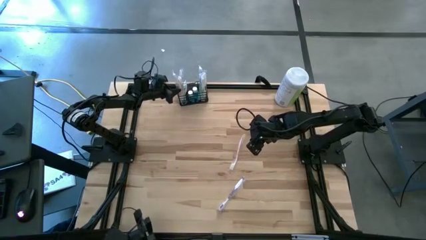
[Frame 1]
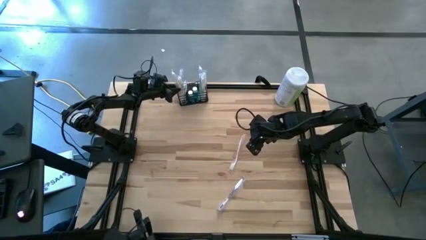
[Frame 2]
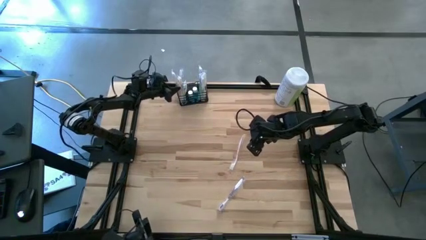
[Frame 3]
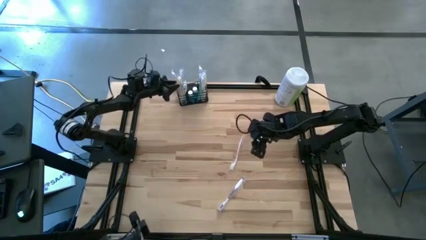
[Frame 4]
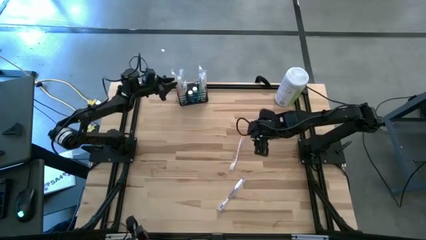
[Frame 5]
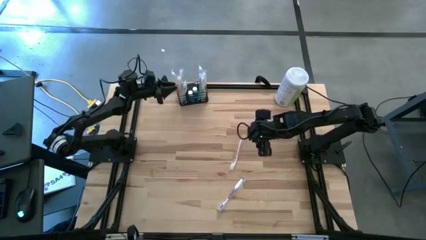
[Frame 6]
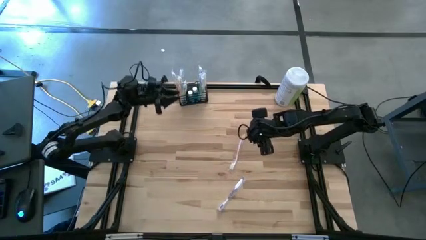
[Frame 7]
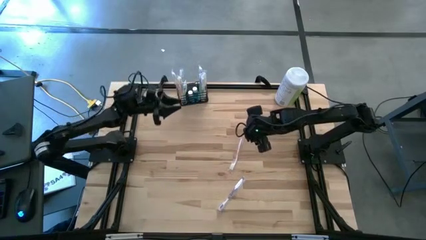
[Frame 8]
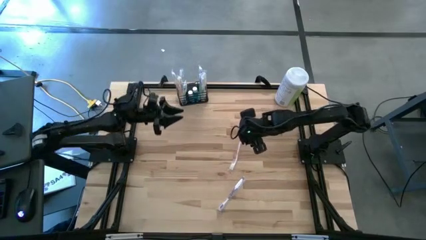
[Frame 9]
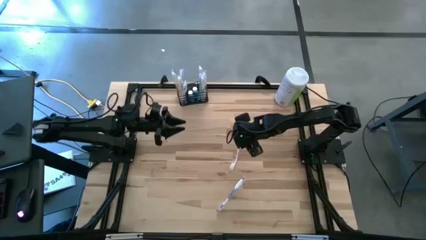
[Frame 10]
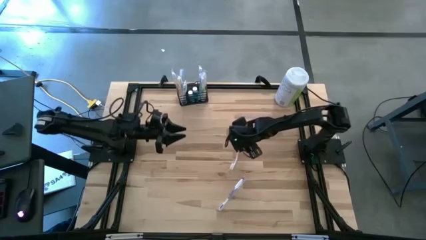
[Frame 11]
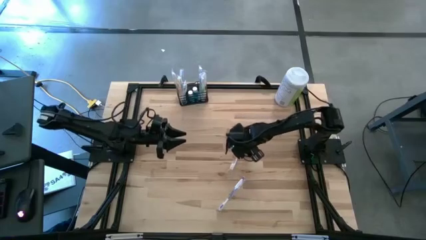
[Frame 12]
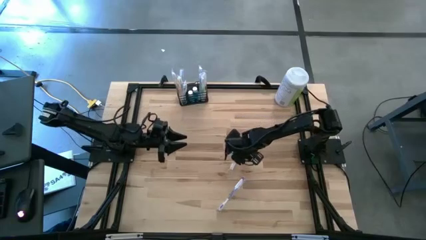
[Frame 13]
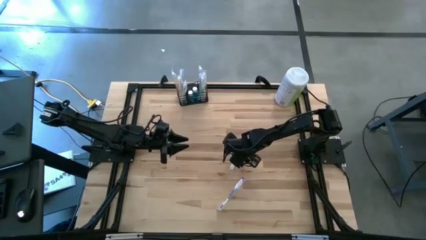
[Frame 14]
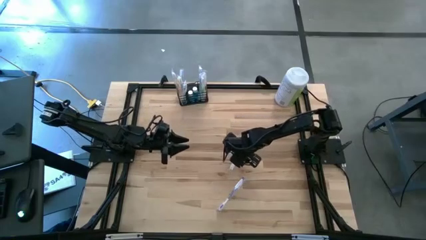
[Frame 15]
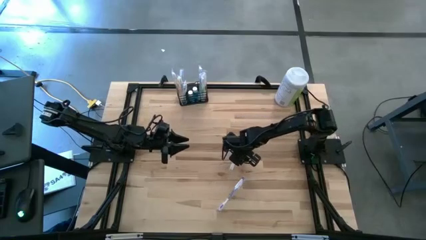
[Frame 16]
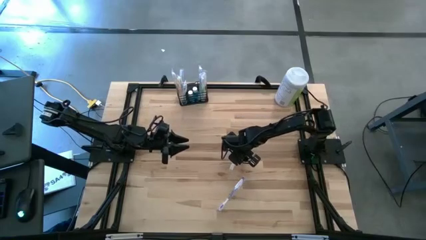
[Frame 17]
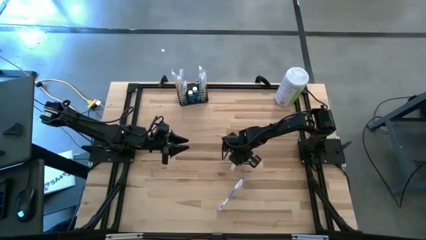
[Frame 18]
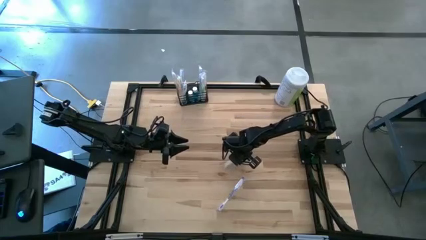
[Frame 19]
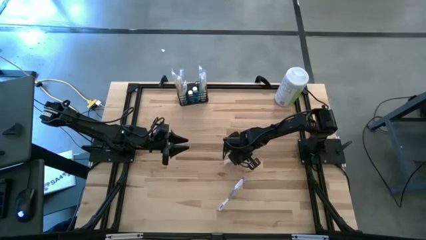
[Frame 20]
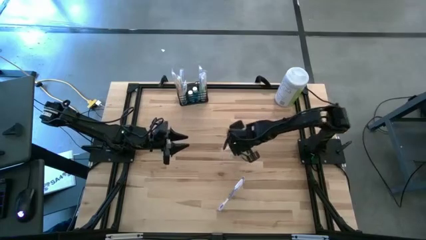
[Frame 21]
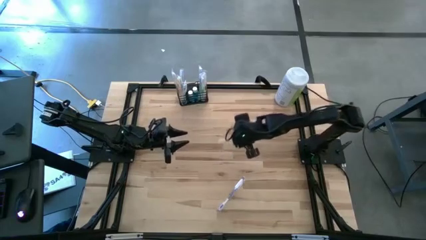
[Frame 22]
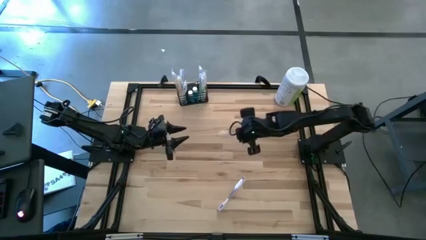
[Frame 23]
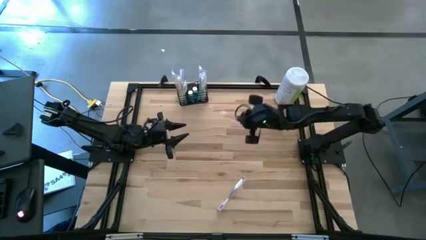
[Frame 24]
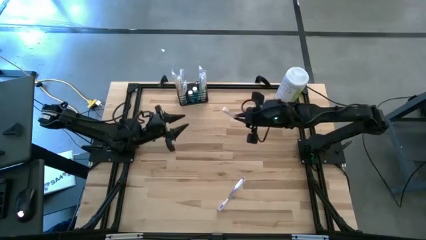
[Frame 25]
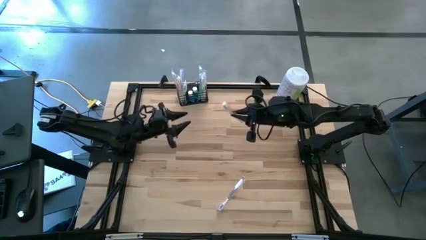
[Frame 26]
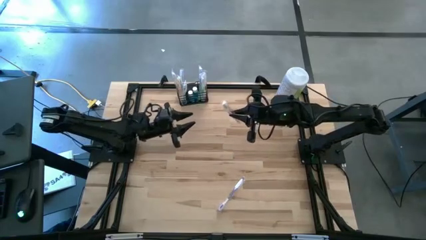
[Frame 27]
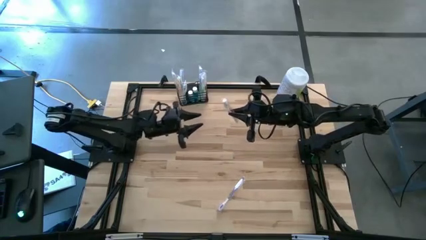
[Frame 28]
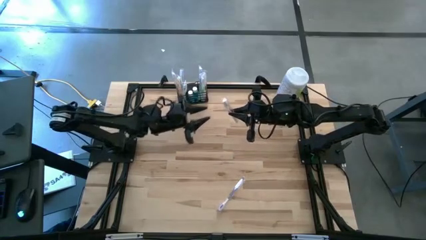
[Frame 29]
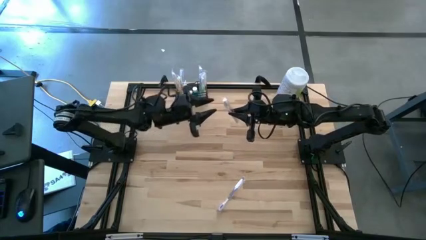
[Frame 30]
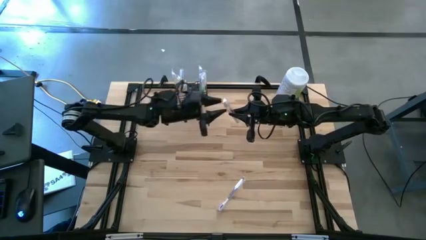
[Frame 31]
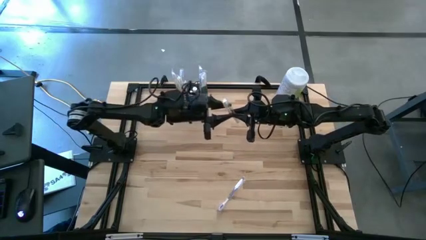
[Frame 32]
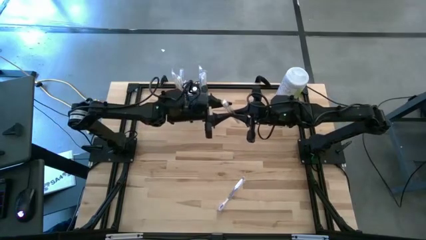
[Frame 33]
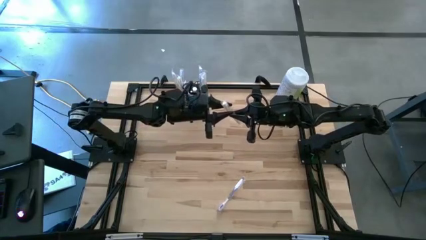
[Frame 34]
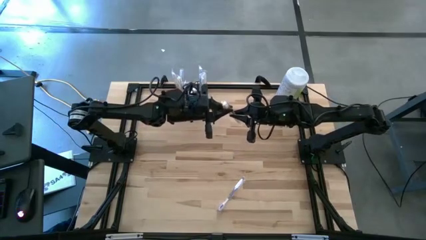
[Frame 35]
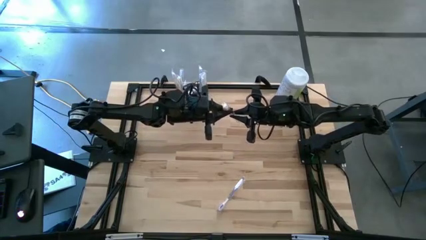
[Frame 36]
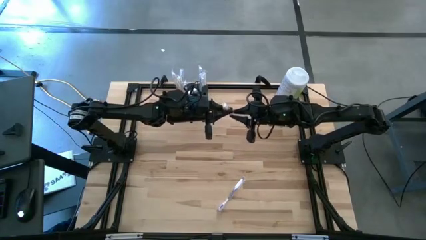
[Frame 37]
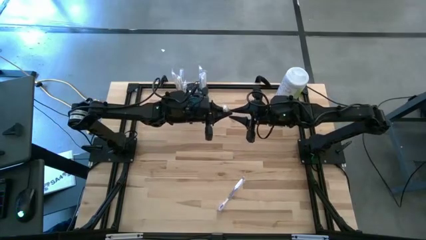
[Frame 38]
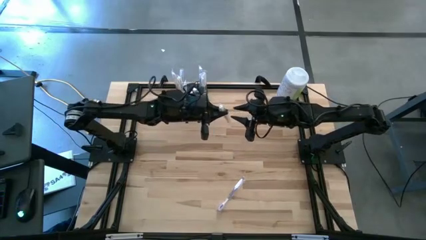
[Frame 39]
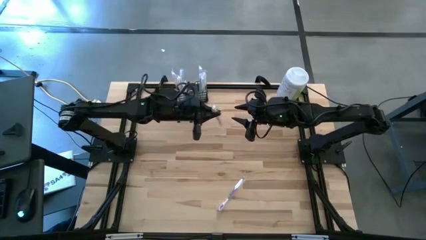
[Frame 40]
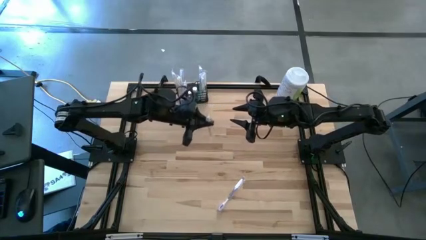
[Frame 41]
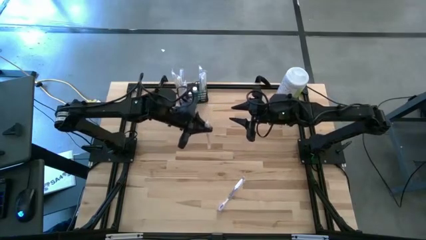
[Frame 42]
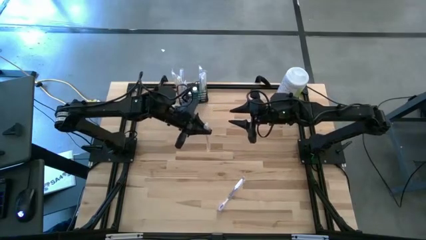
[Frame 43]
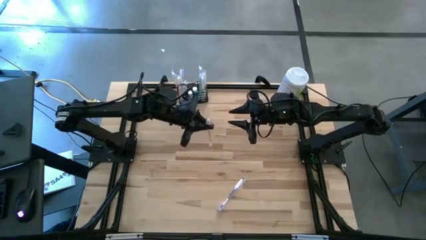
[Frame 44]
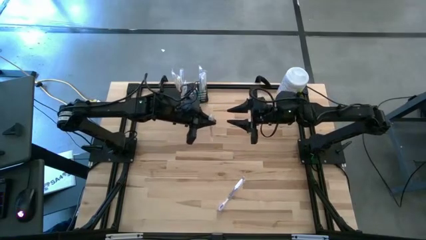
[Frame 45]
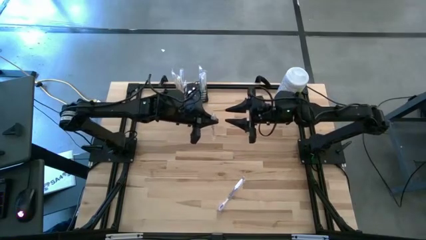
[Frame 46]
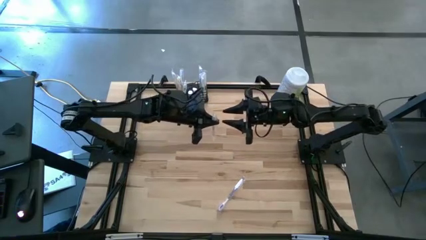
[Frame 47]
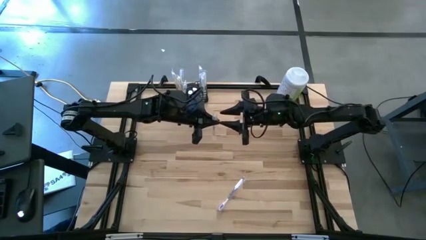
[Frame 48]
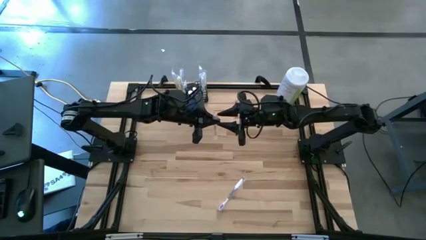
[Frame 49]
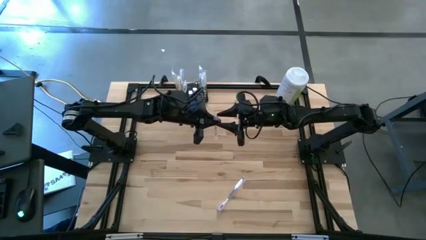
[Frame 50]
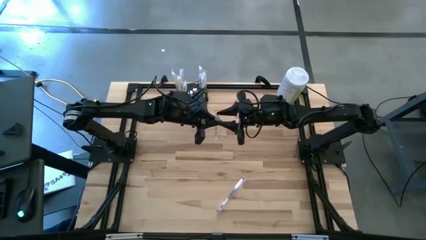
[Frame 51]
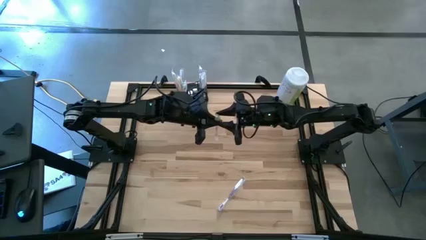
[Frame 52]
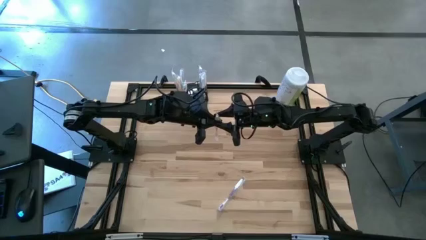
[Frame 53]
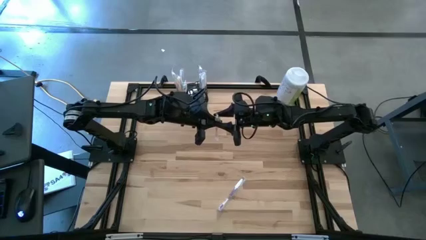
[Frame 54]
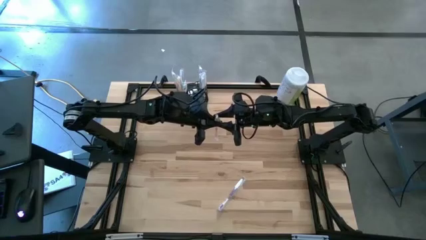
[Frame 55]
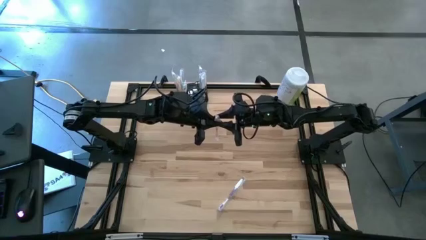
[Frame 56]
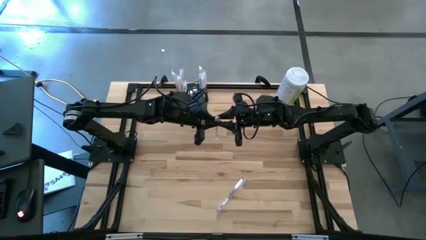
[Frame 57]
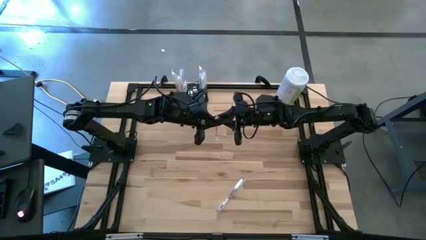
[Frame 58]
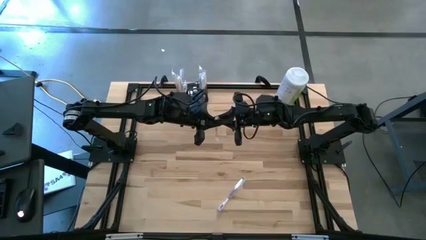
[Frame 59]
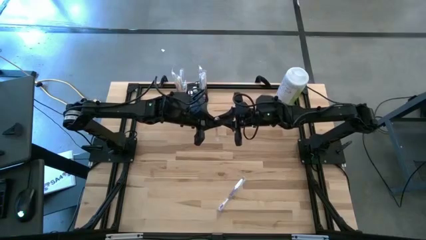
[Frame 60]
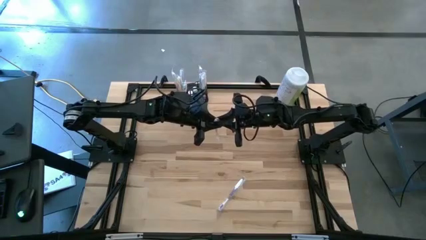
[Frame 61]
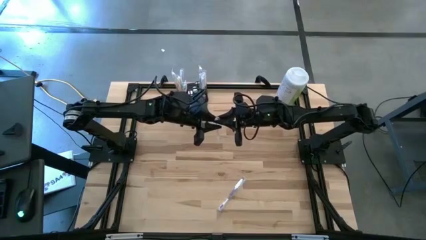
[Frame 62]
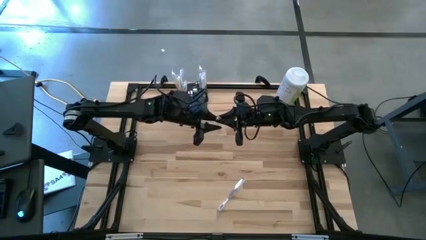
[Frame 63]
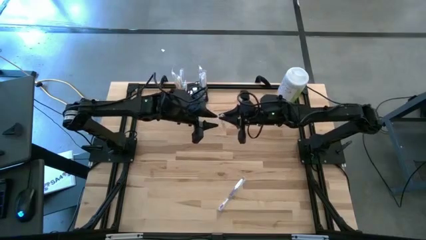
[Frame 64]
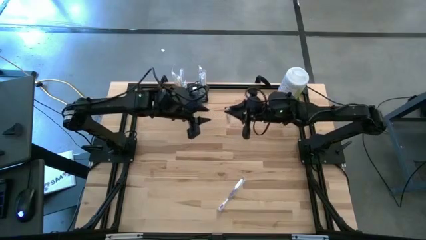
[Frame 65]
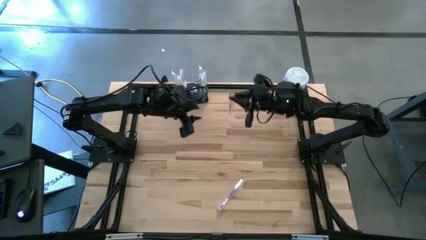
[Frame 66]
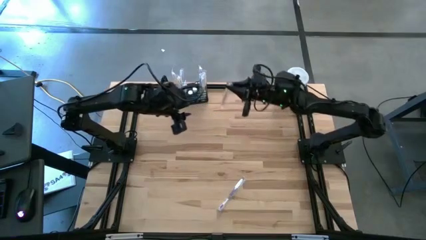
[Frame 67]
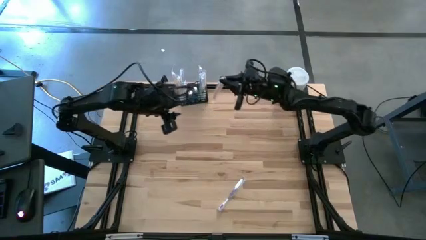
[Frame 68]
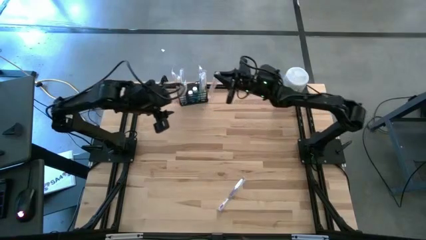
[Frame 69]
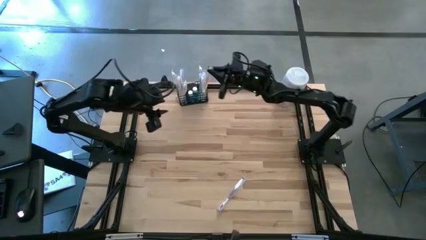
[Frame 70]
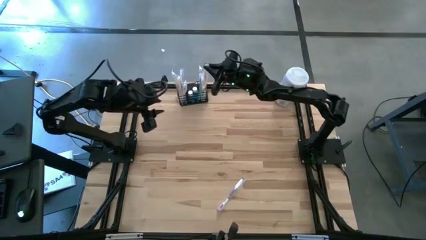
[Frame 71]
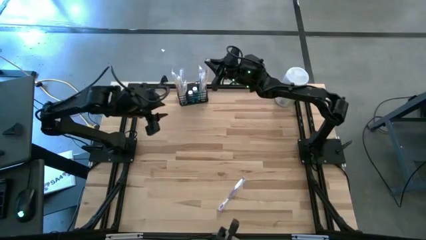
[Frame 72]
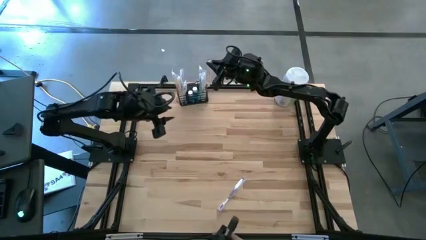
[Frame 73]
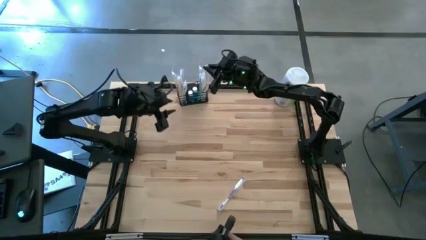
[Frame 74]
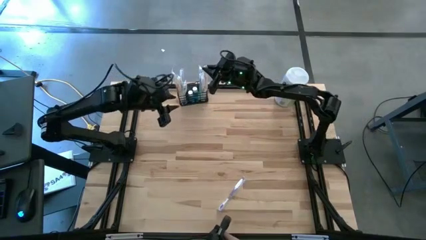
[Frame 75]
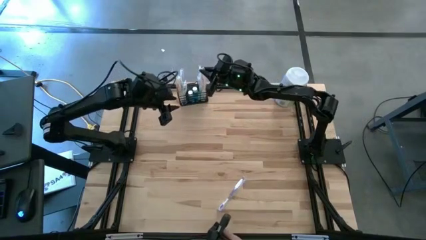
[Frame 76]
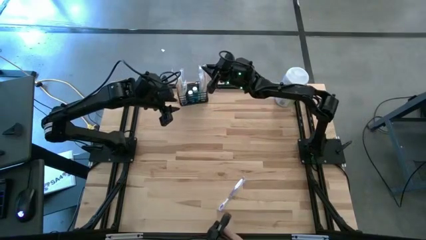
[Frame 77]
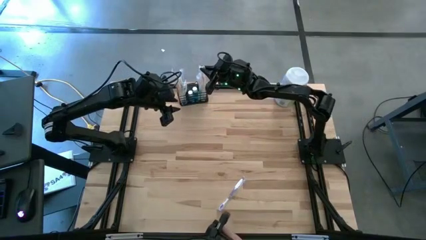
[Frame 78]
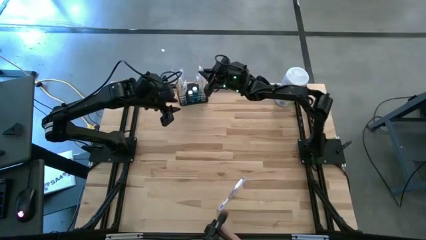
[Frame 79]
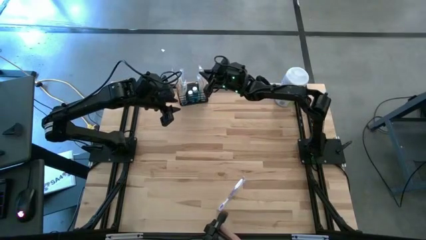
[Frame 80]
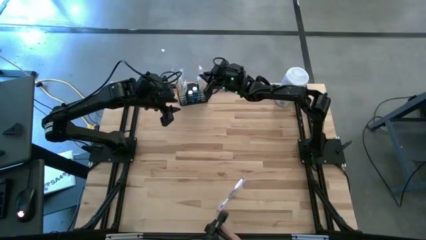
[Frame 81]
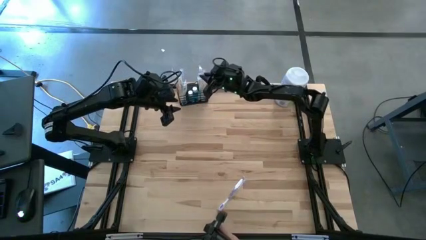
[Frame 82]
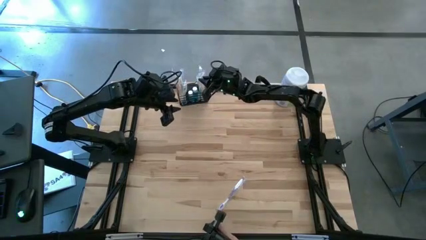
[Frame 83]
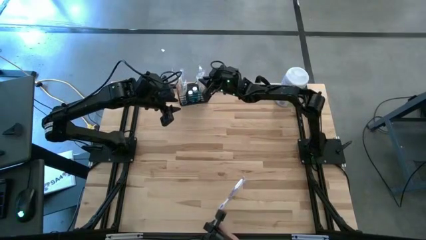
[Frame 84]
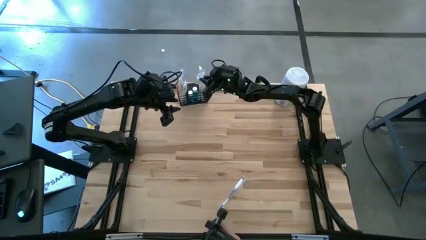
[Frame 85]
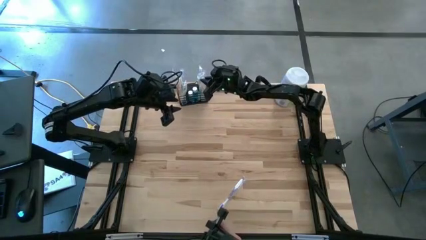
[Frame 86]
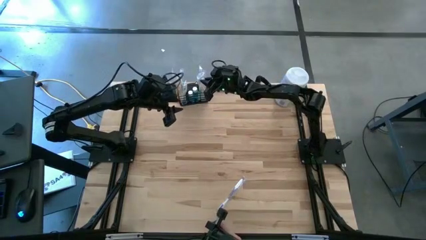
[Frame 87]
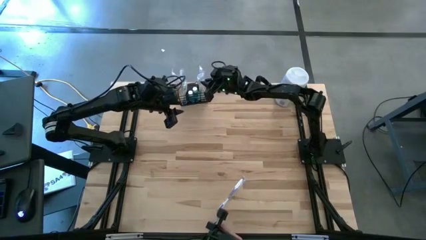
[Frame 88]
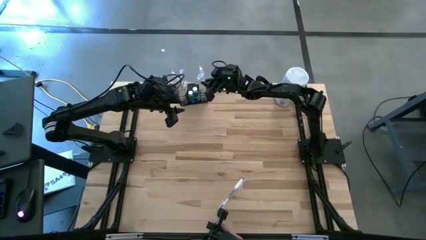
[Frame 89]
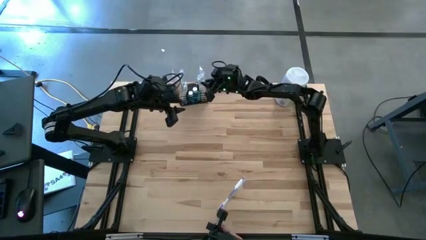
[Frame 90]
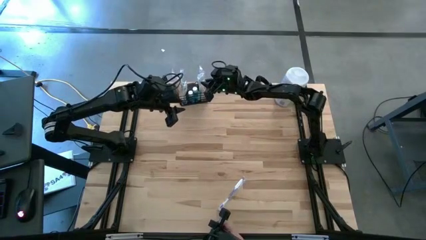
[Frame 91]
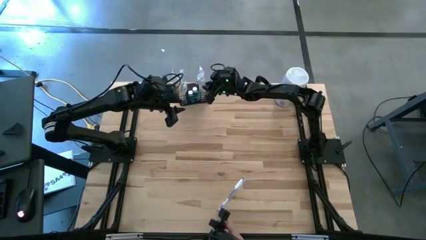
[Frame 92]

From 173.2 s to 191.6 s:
Task: Pick & Place toothbrushing station
Put the orange toothbrush into the black wire organizer
